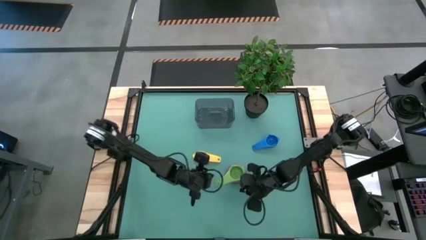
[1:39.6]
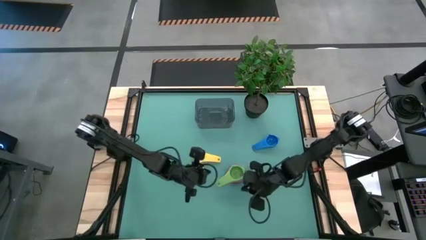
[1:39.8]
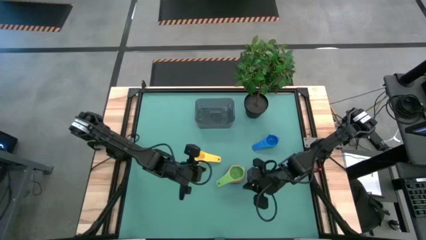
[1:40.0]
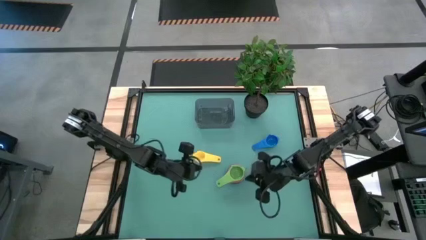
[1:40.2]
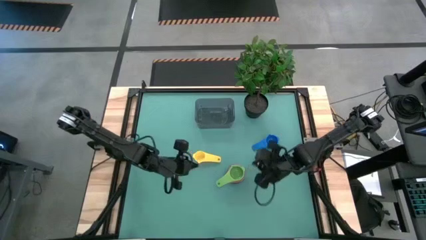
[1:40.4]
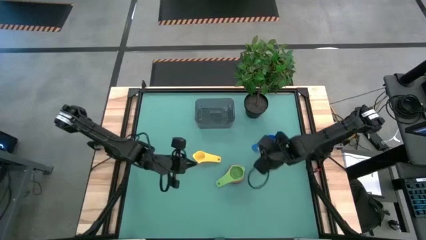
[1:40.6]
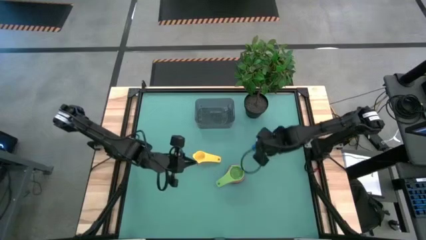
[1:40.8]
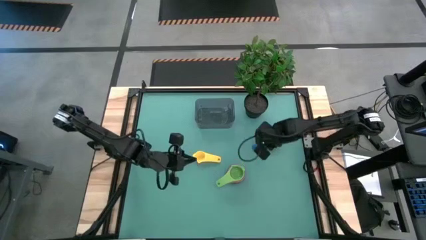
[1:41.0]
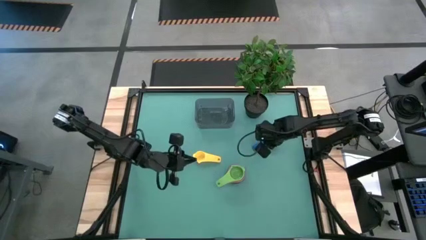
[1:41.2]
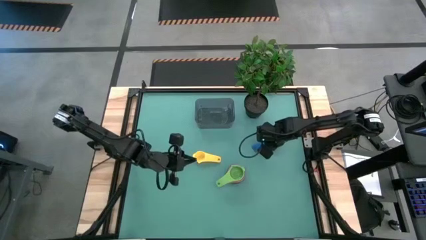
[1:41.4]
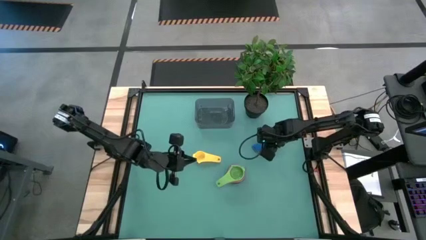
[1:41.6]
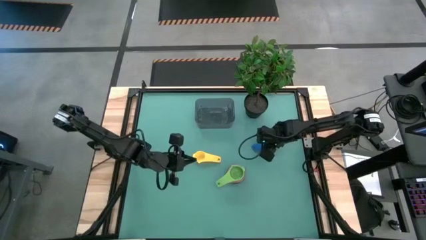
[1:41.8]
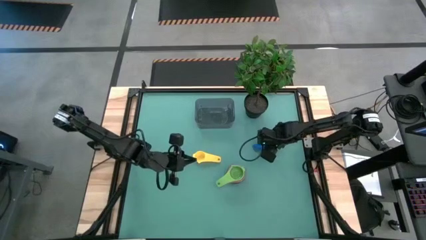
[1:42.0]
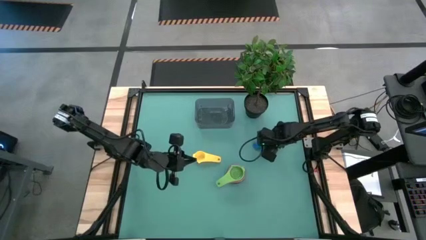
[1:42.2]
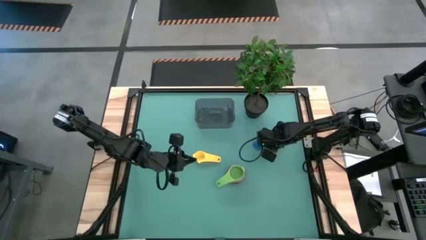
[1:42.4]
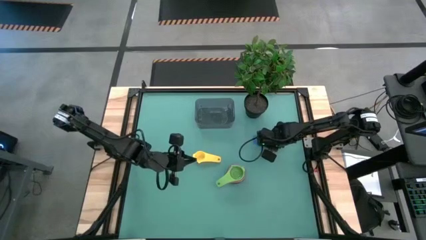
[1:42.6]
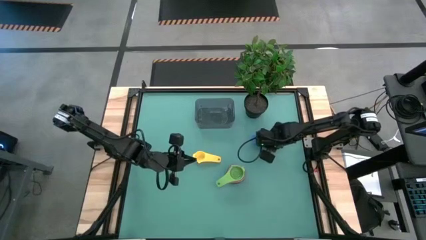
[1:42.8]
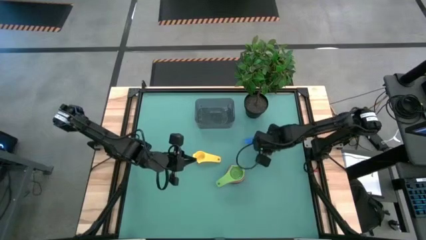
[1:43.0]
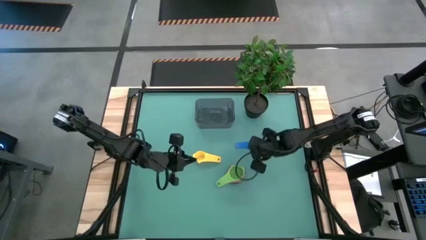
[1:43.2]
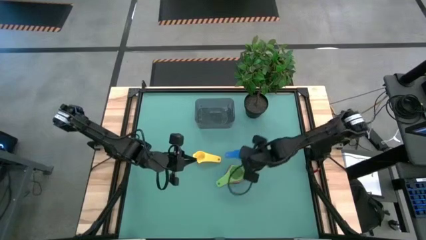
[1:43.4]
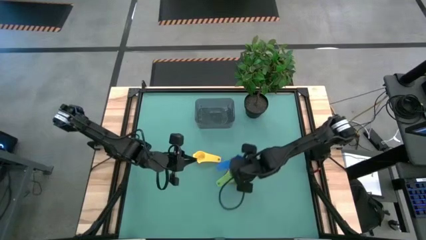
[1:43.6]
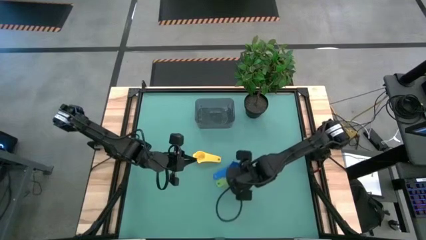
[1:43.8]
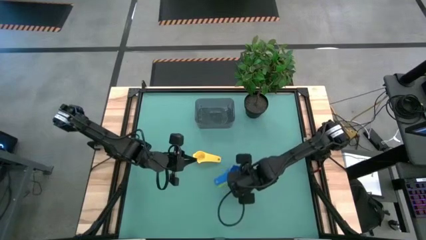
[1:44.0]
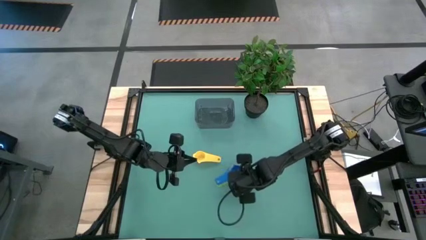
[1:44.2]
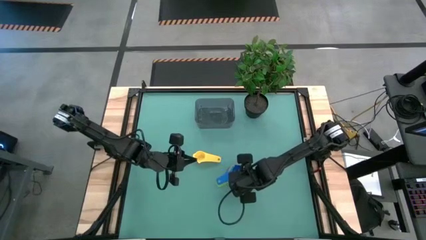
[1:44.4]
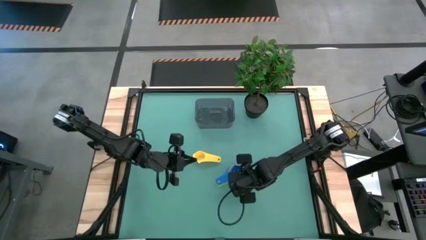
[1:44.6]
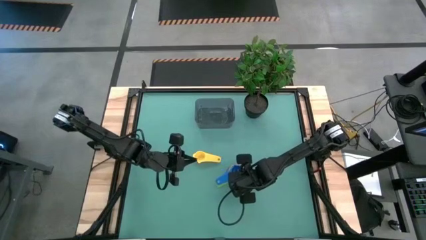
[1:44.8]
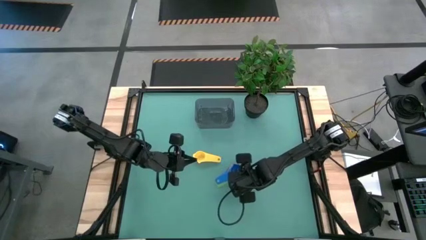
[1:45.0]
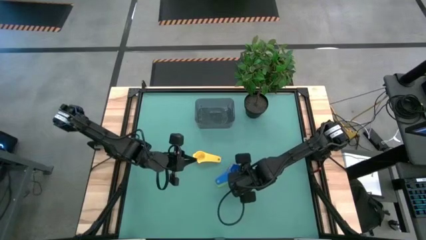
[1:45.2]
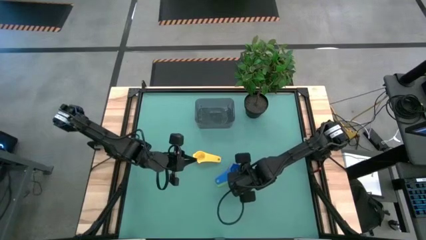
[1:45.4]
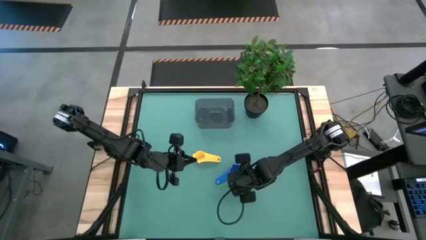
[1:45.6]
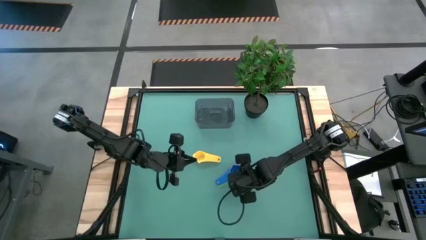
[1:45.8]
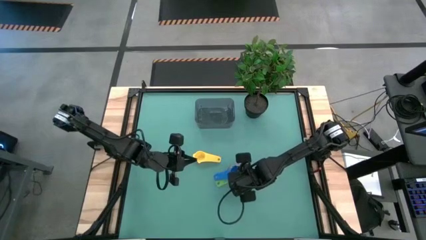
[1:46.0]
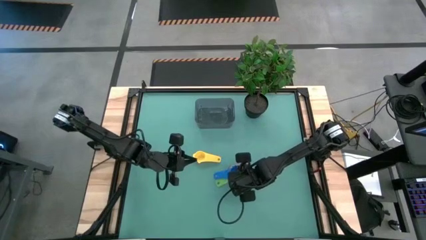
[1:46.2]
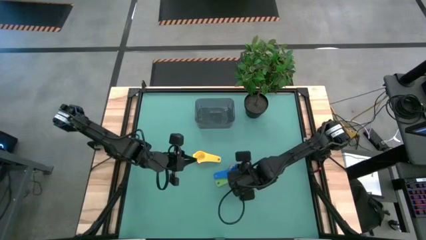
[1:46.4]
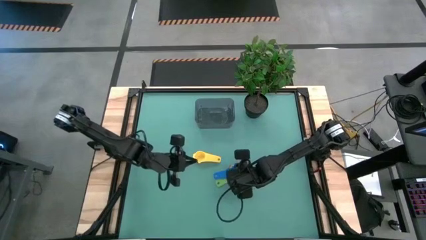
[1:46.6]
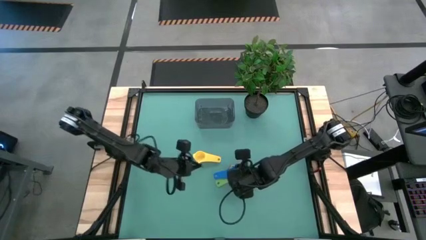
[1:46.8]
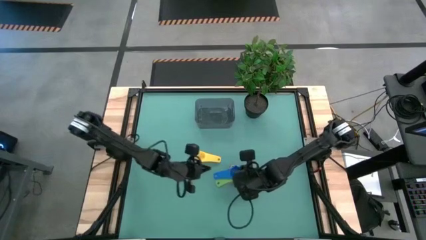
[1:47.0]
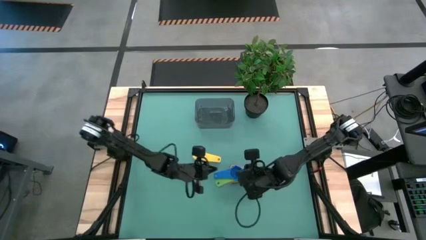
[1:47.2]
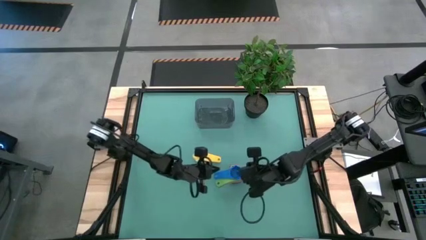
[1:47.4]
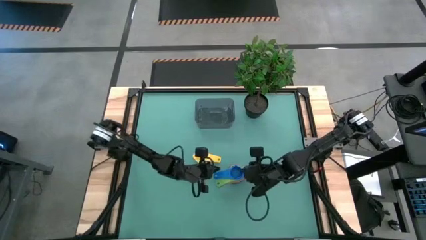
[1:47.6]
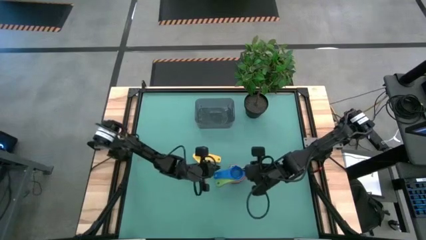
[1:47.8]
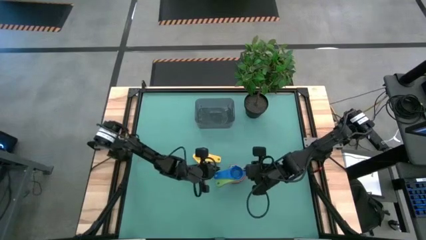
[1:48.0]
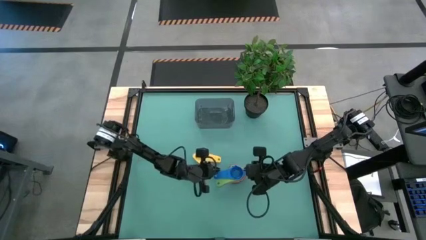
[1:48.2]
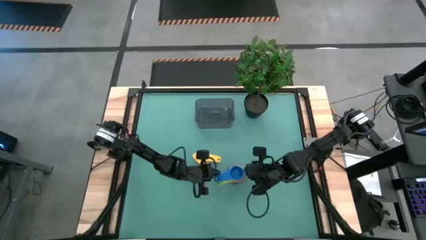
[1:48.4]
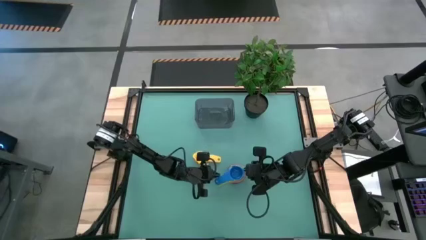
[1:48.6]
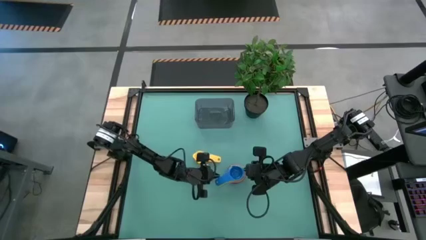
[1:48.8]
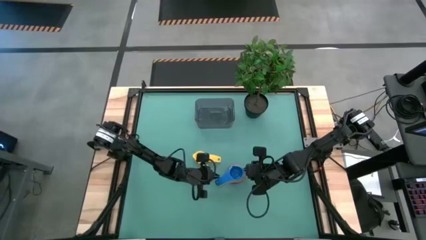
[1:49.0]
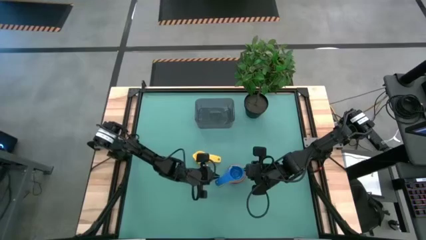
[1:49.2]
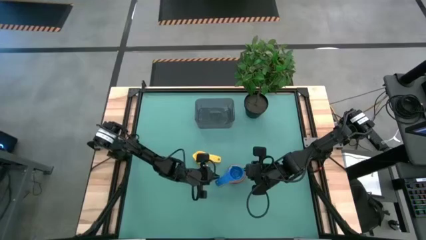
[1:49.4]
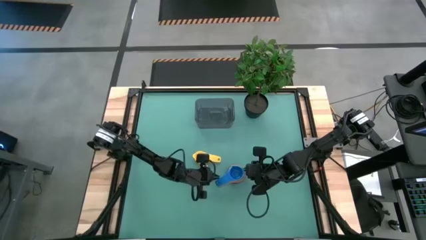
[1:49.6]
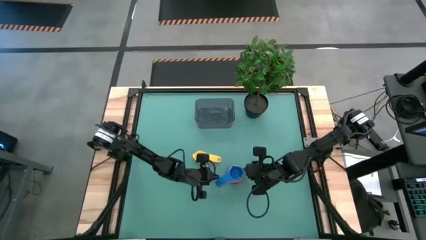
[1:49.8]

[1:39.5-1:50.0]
Task: Nest measuring cups in basket
Stack the dark blue measuring cup into the green measuring cup

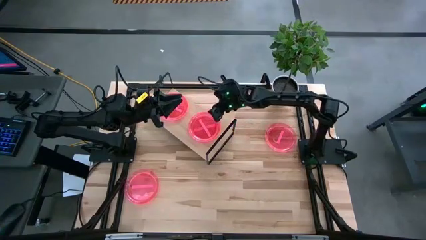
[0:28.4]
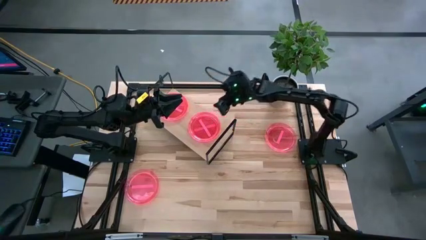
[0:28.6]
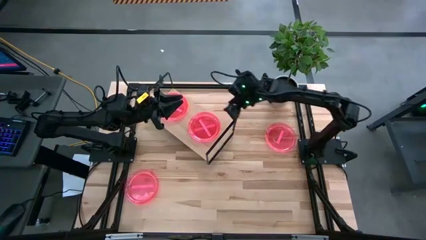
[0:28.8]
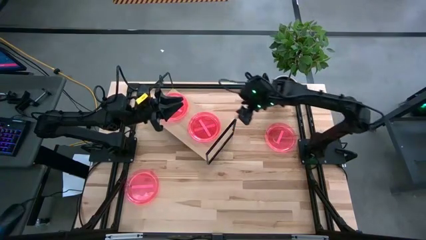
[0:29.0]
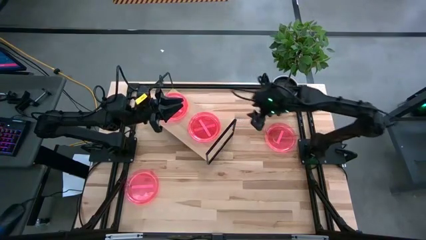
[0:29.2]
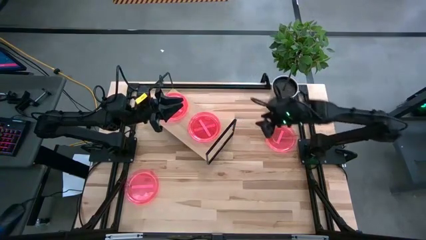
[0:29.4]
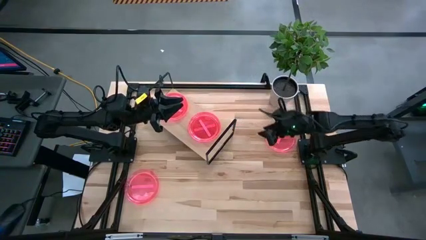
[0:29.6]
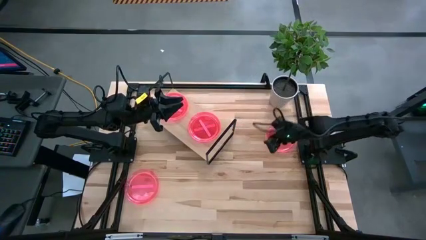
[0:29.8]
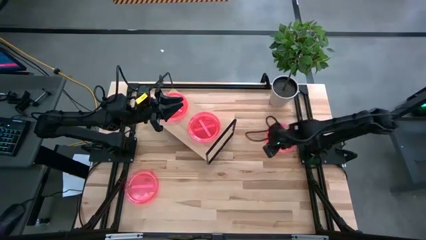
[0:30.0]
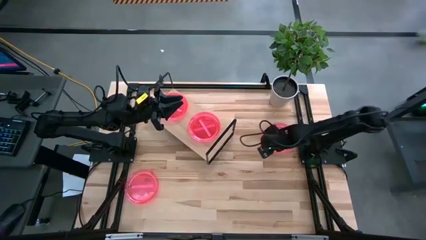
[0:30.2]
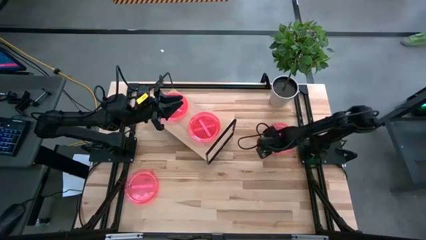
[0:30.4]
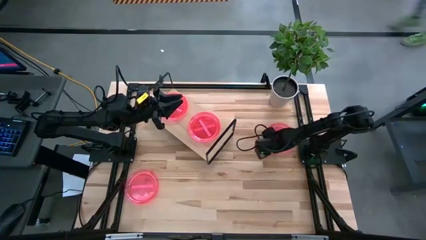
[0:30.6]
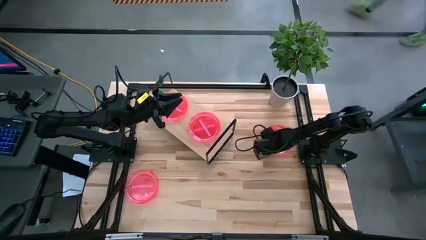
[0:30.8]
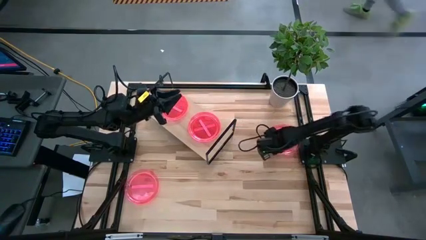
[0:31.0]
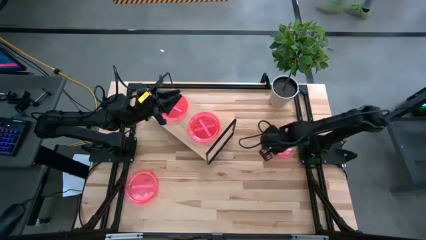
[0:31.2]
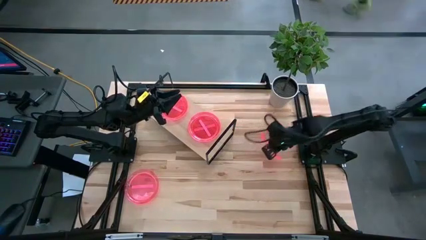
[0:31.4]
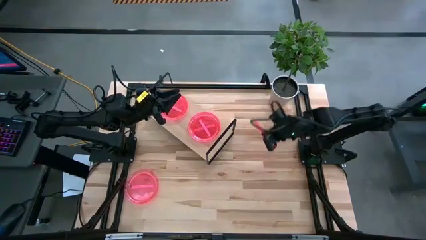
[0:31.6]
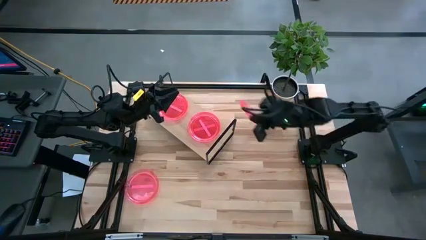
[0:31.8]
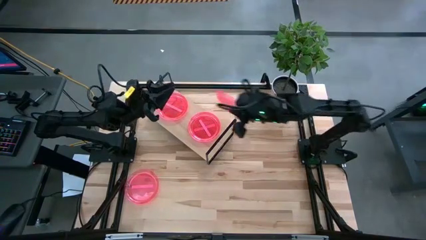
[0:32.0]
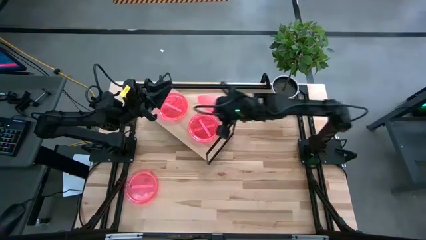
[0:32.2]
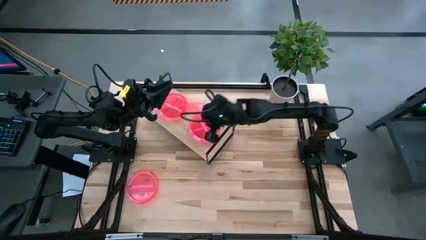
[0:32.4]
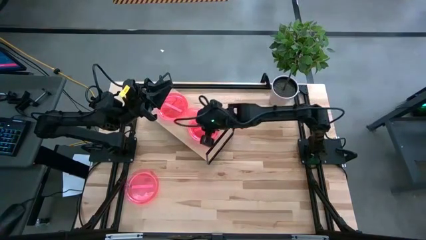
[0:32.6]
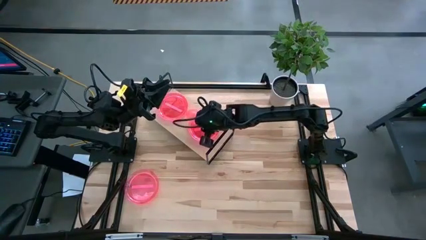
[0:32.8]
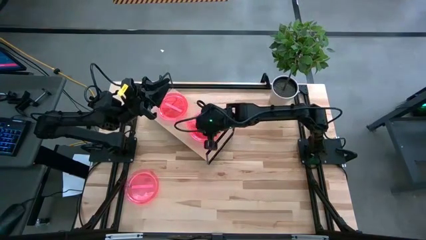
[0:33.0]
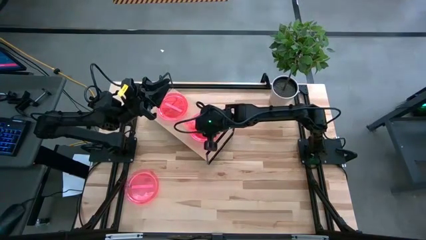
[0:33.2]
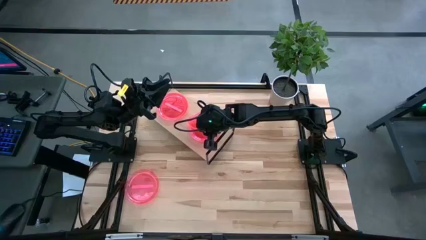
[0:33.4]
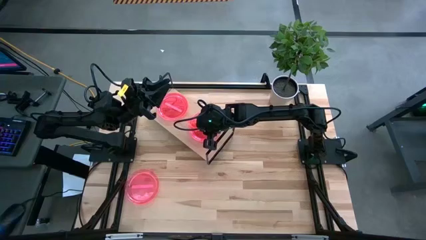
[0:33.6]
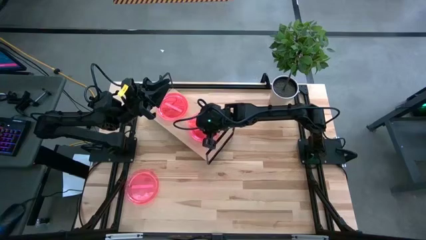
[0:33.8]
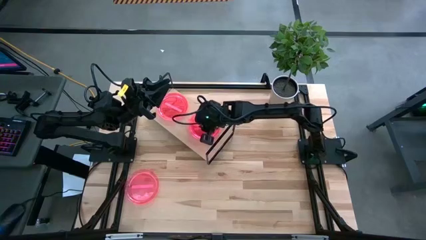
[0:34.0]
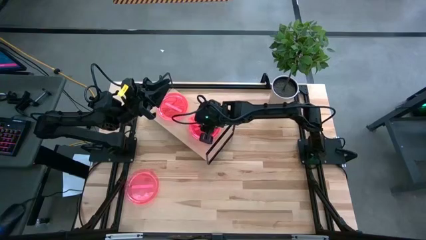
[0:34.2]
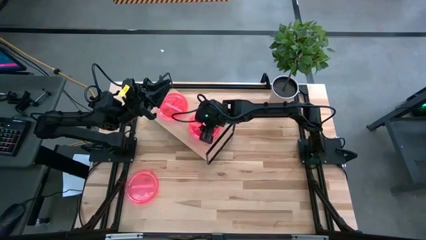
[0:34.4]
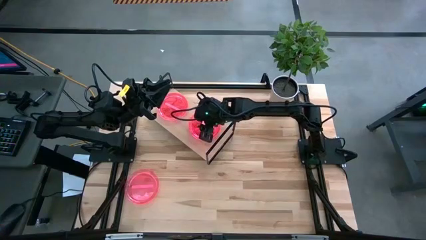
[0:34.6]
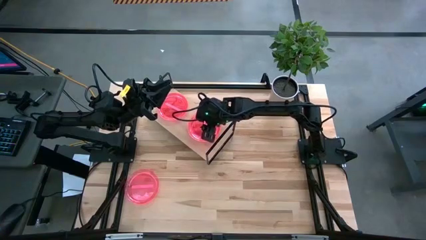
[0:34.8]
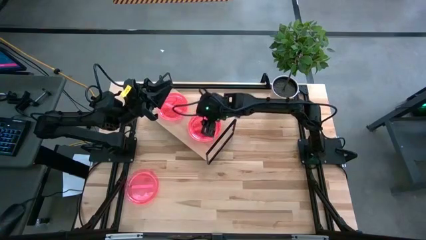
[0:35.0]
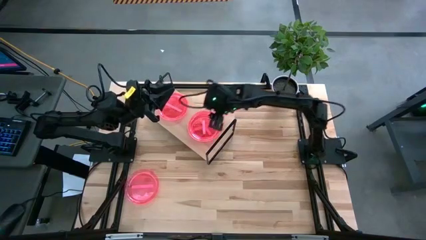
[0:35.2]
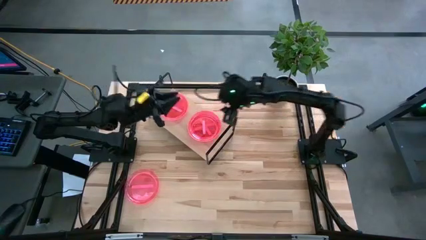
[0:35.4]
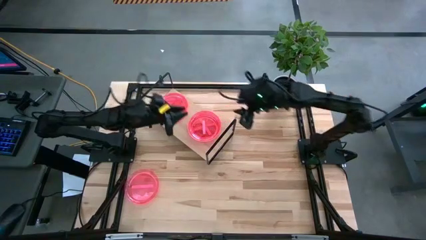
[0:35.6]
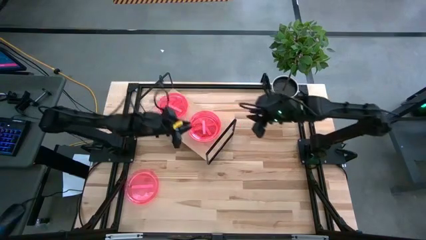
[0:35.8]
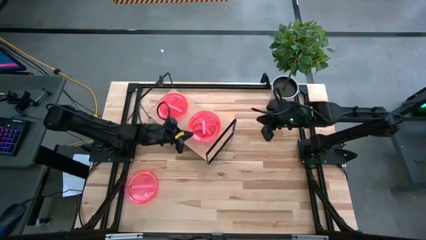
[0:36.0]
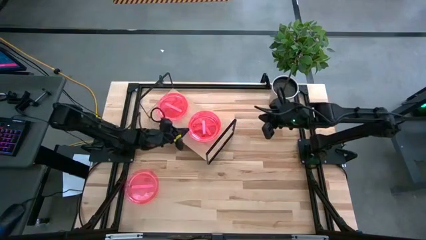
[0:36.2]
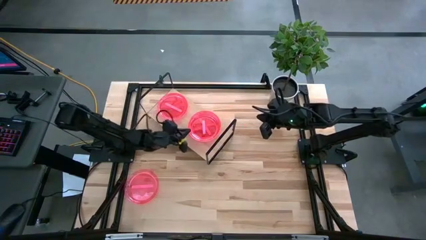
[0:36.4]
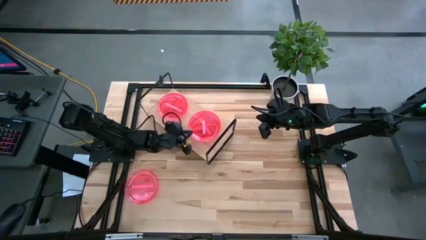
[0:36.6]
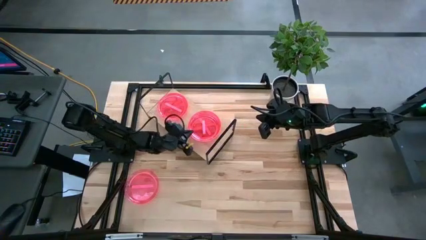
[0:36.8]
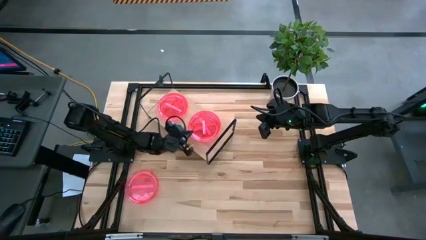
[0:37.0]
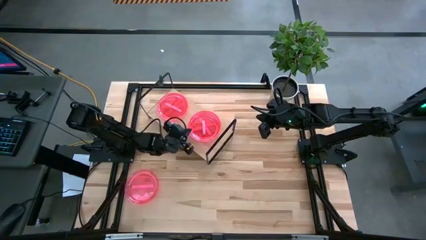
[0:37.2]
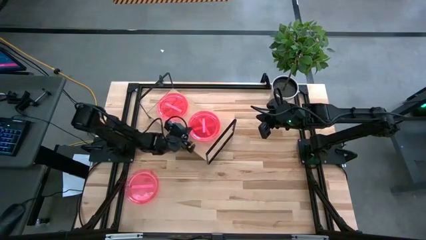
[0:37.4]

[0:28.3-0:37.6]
Task: Place and stack plates onto a shelf
Stack the pink plate on top of the right pink plate on the shelf
